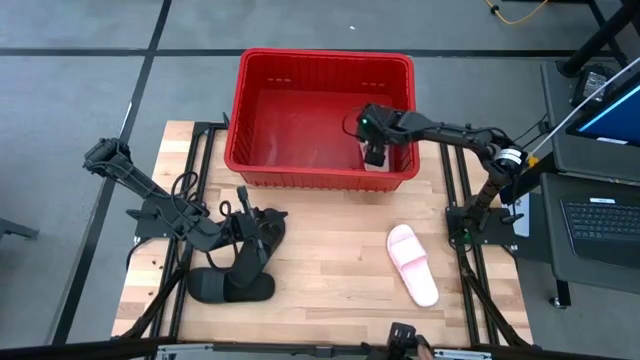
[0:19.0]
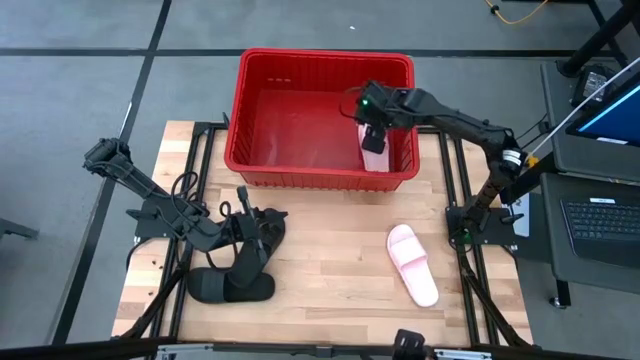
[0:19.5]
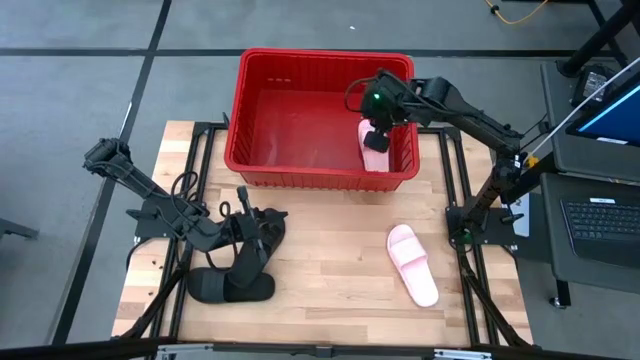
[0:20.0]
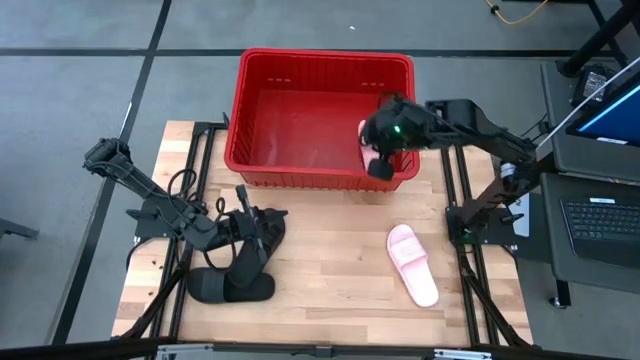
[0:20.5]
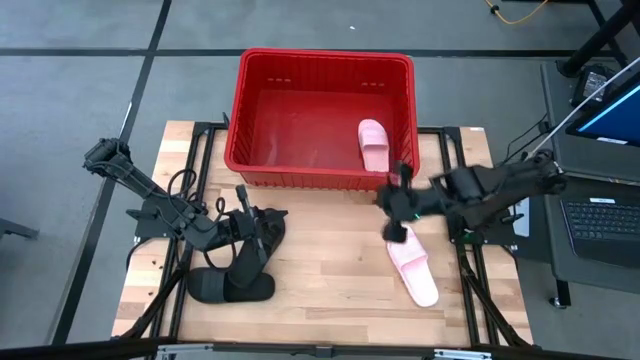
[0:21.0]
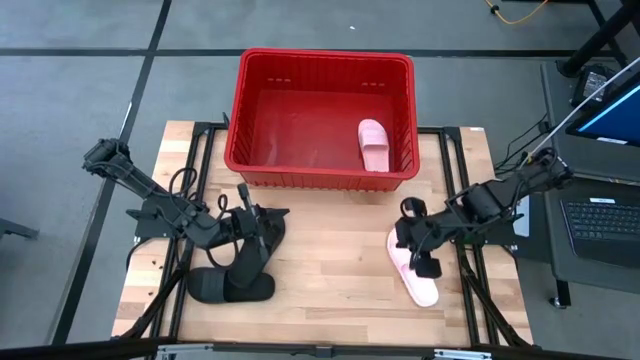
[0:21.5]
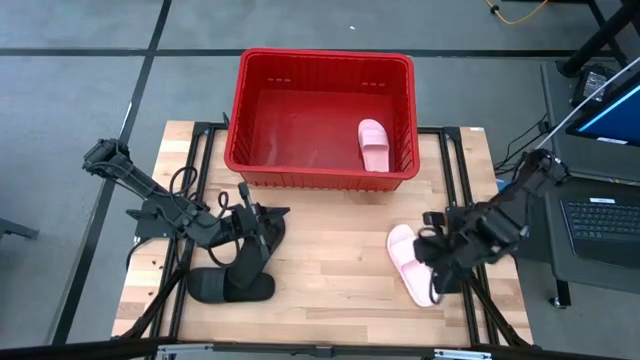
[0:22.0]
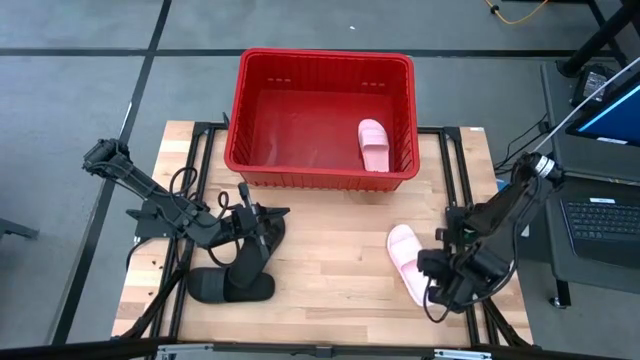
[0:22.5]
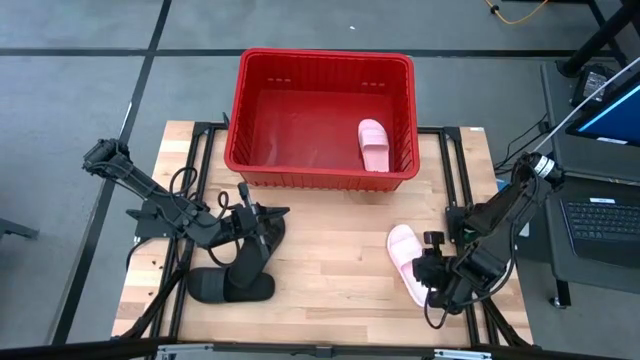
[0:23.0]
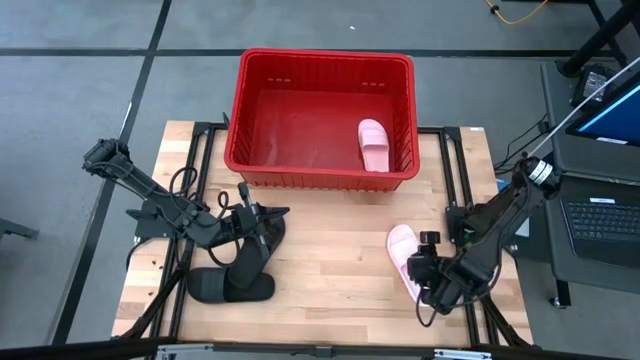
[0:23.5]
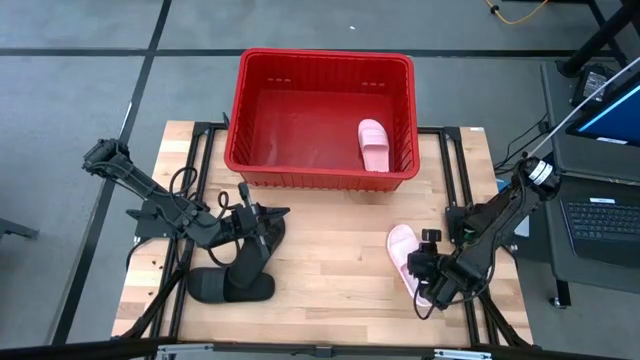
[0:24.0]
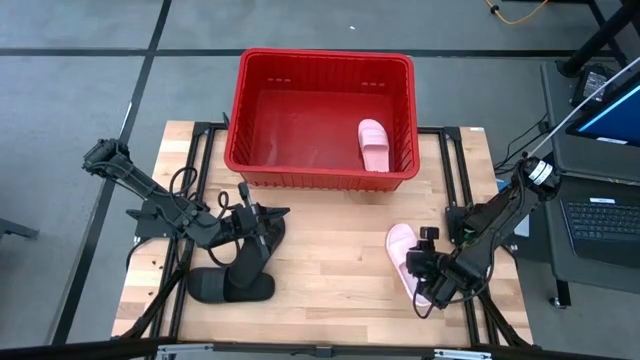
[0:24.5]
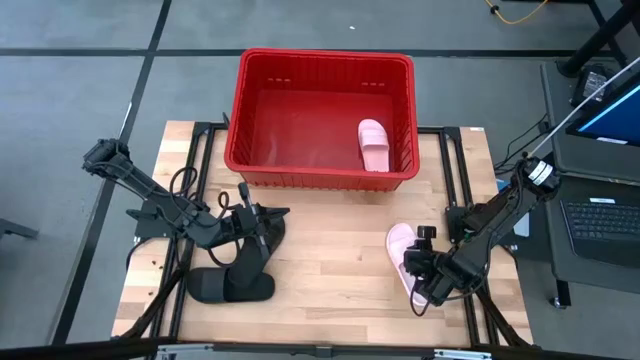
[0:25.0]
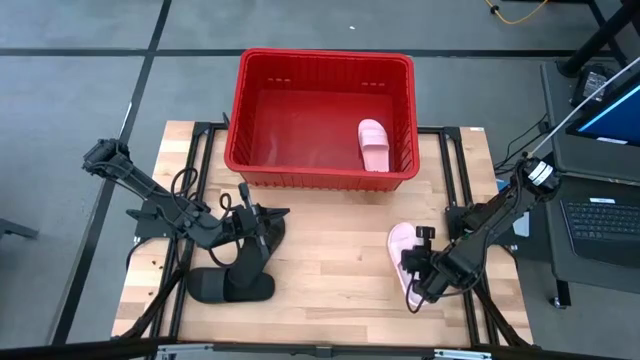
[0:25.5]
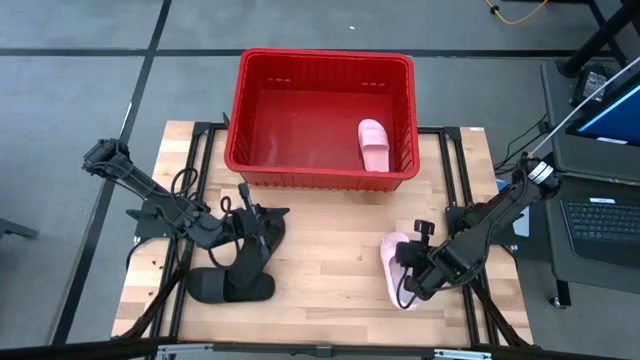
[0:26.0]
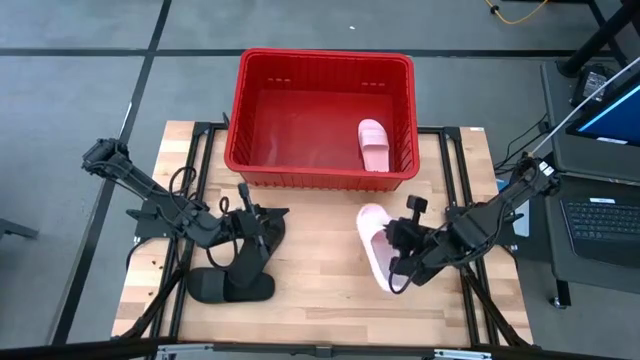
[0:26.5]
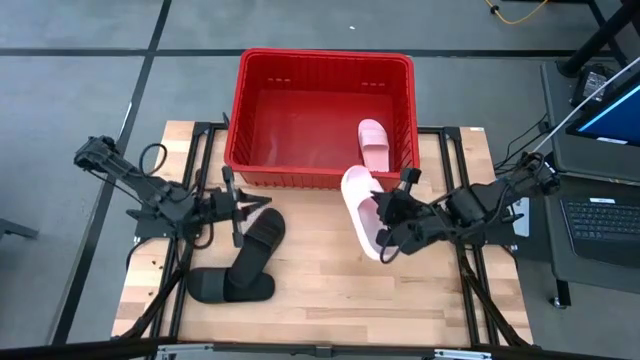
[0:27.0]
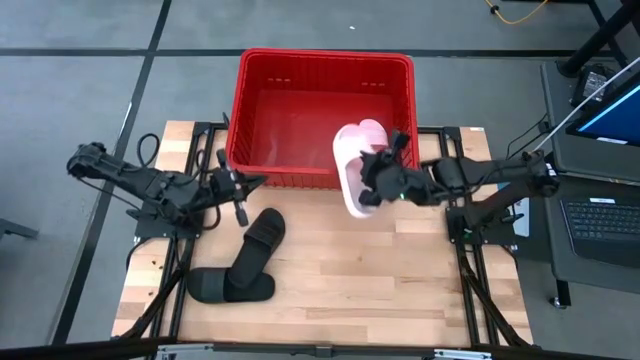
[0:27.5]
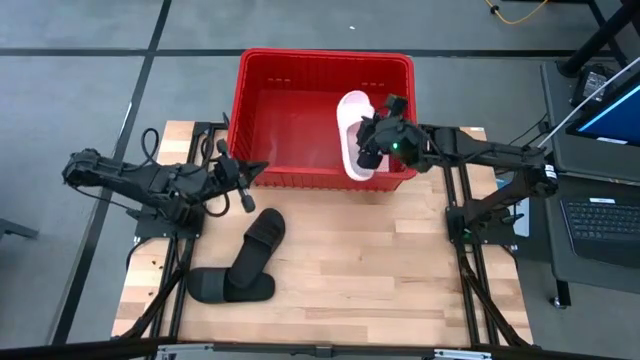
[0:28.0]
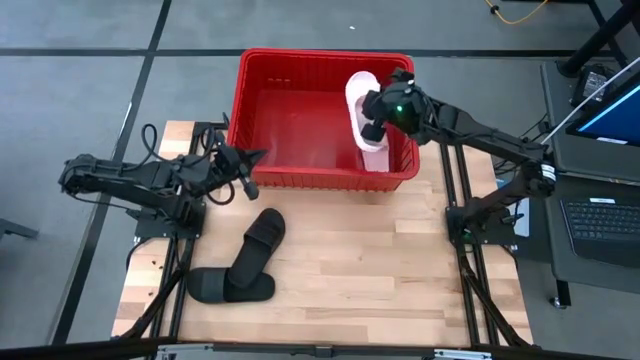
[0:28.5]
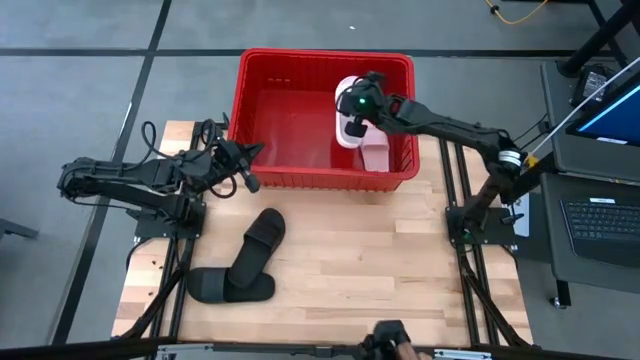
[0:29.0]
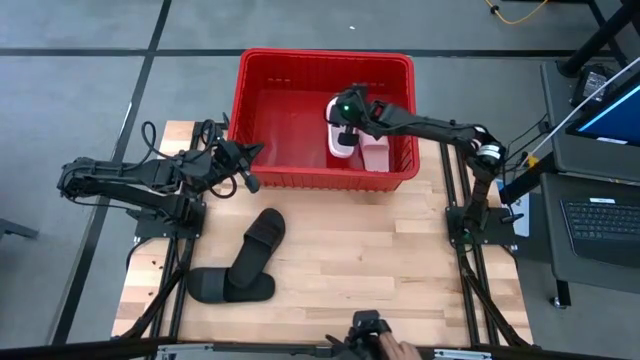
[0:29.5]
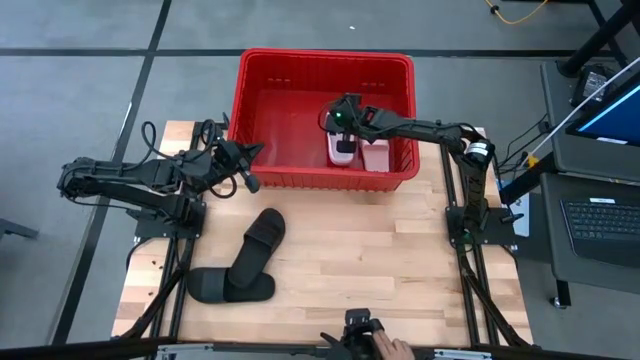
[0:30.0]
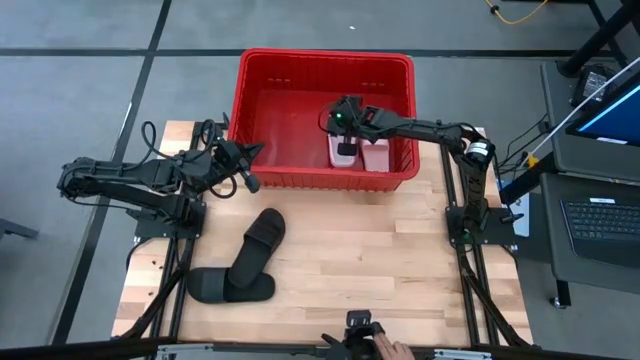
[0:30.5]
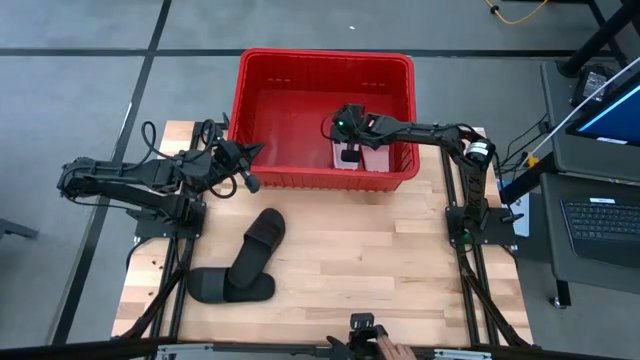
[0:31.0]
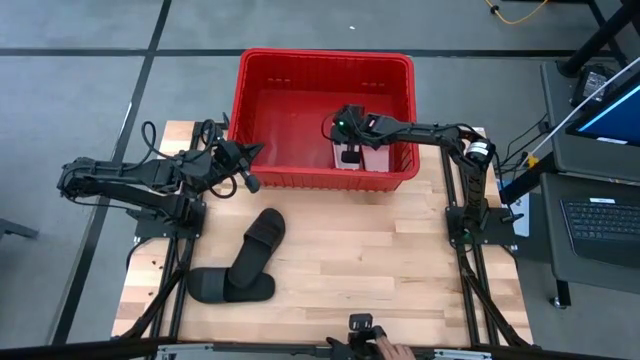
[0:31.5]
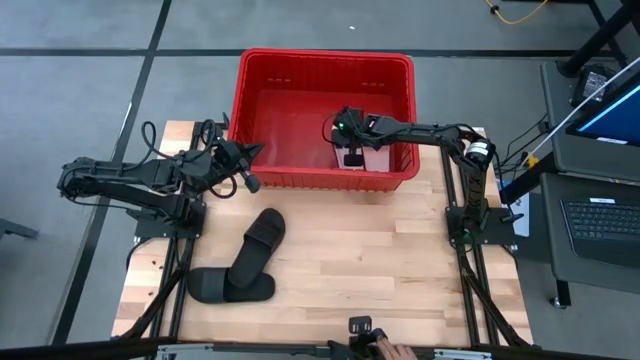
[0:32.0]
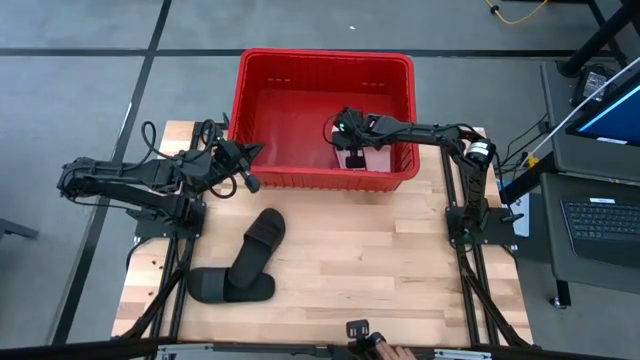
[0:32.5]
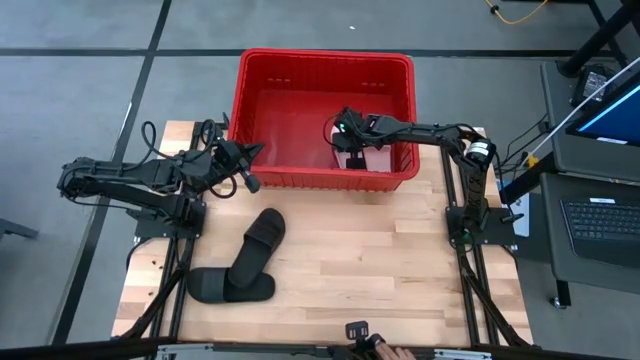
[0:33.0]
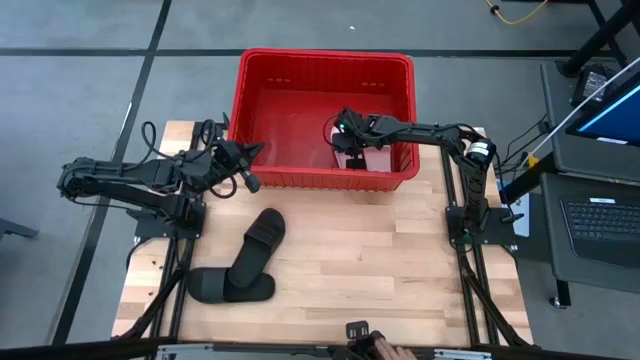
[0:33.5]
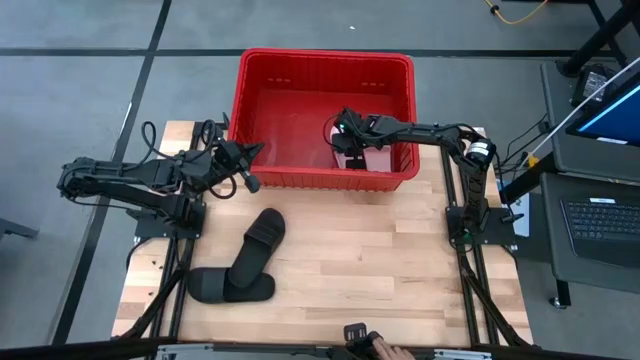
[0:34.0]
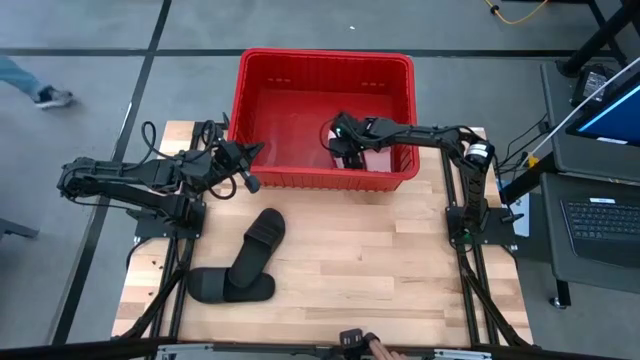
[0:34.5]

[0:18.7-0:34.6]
Task: Pick and place slides into bin
Put the pink slide into the red container

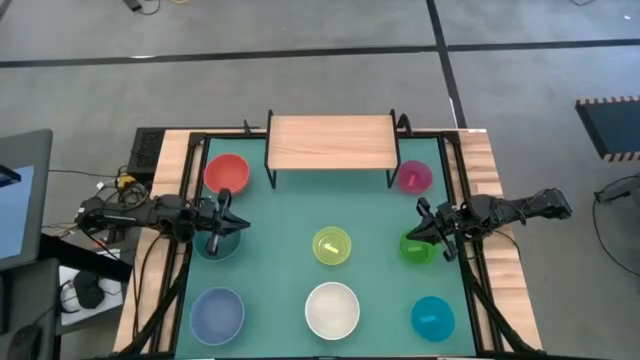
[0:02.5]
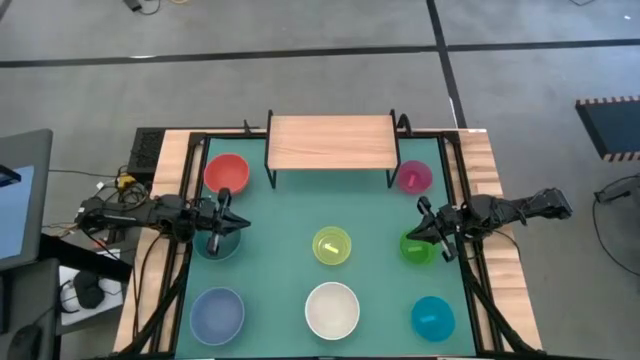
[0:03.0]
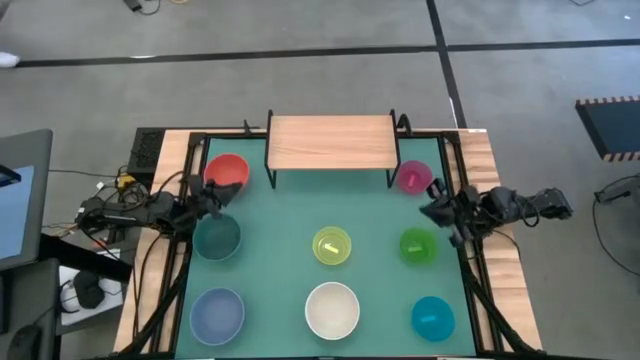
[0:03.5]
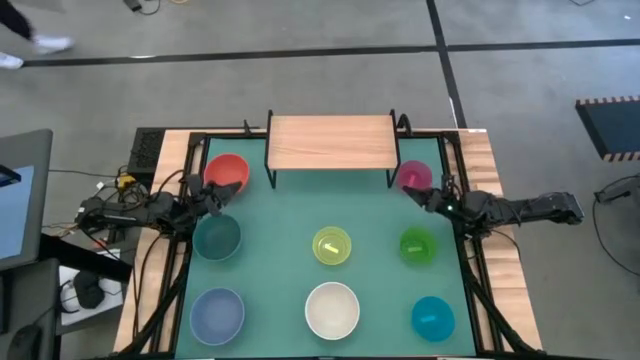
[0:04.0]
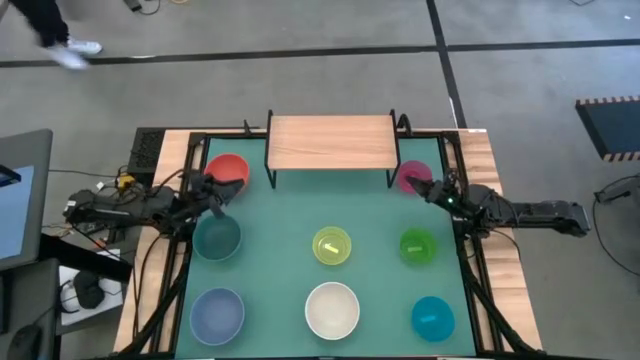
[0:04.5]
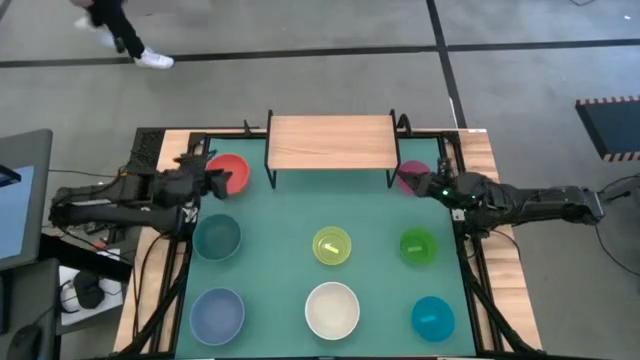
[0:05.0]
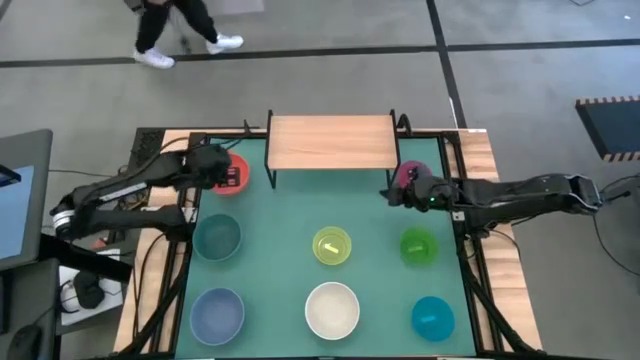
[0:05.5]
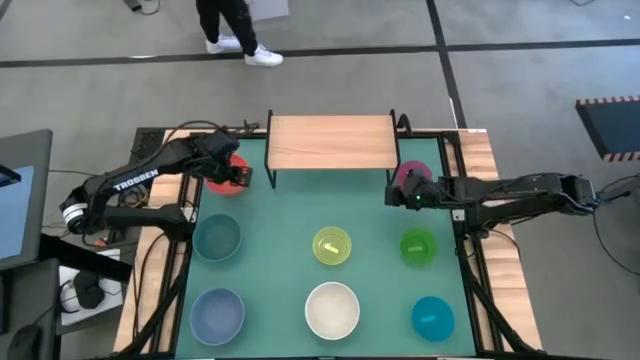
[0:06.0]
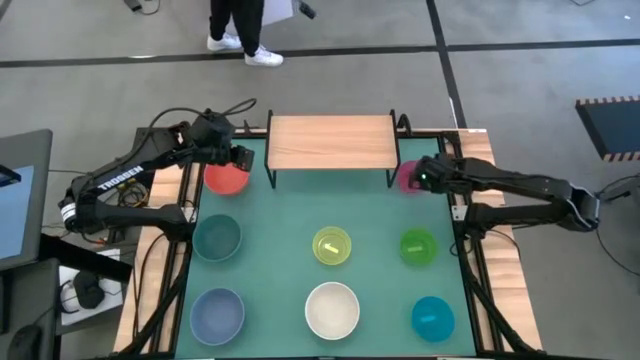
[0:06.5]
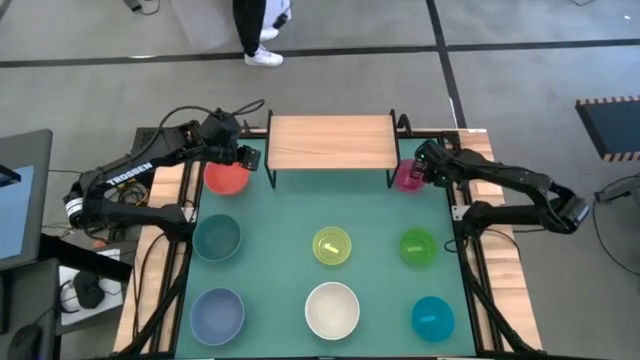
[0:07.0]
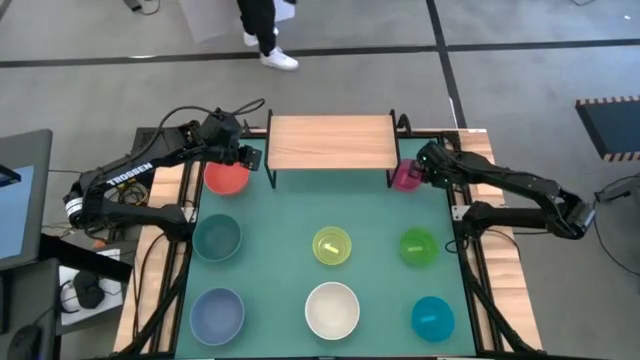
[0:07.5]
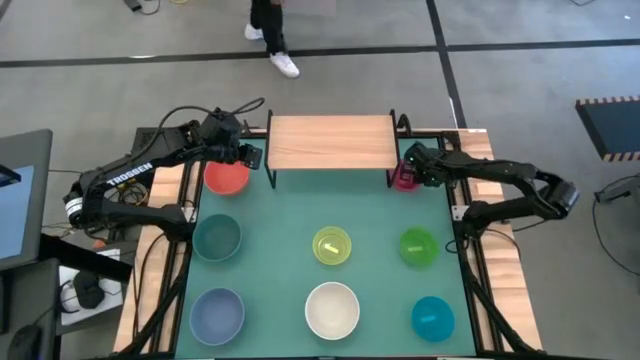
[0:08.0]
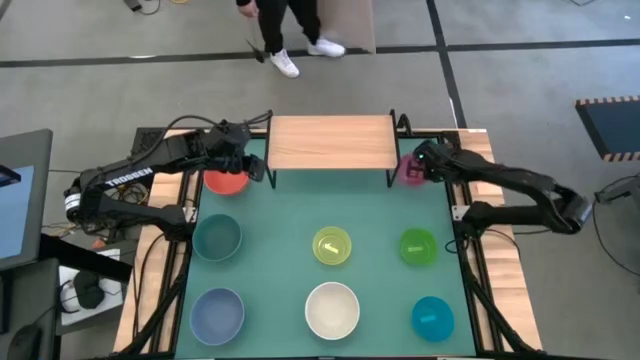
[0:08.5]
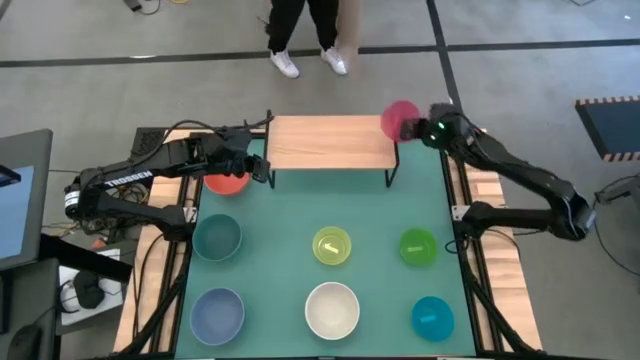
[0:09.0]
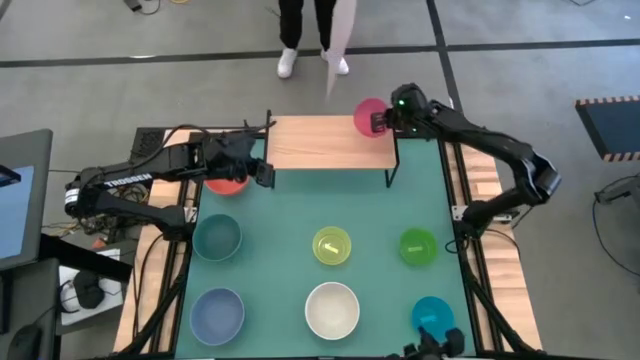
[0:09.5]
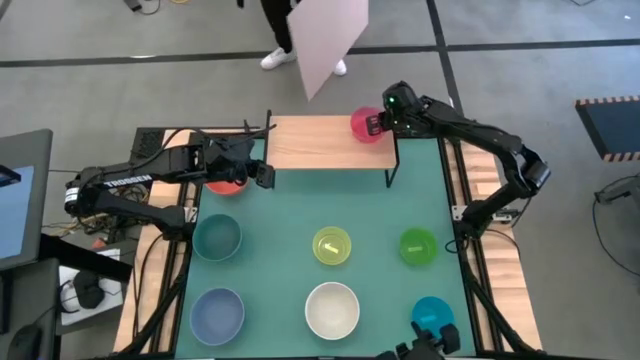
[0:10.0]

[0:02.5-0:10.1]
Task: Place and stack bowls onto a shelf
Put the small pink bowl on the shelf
